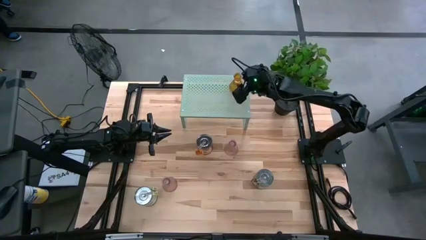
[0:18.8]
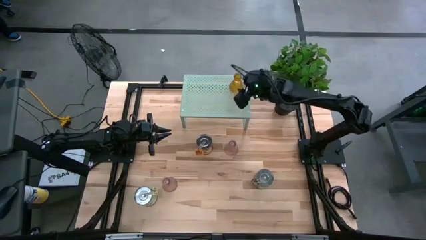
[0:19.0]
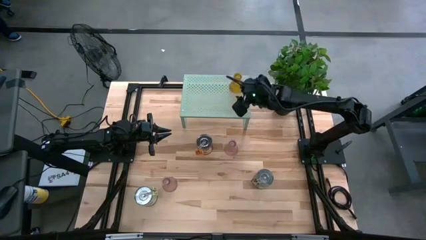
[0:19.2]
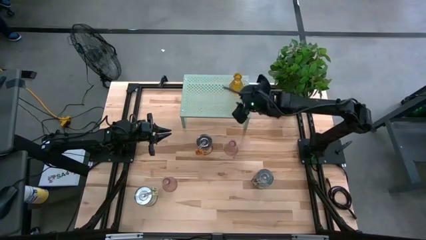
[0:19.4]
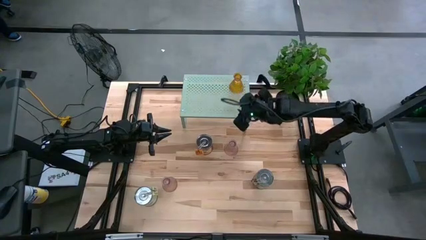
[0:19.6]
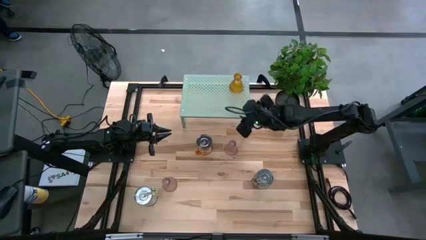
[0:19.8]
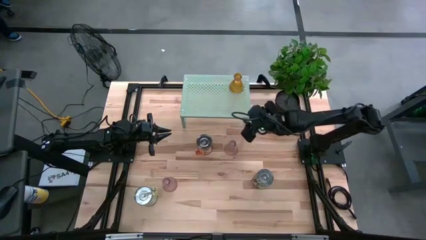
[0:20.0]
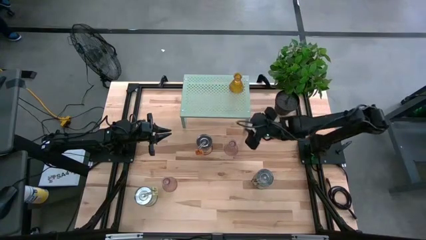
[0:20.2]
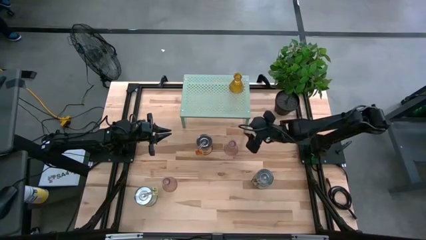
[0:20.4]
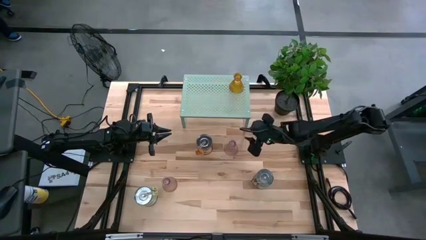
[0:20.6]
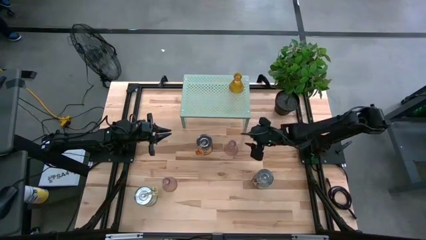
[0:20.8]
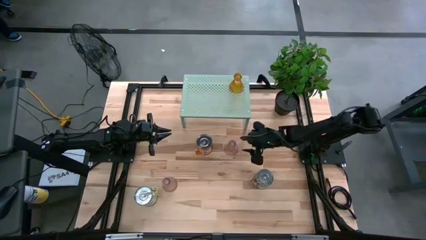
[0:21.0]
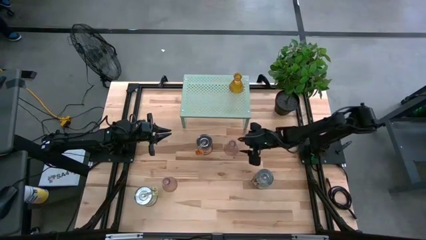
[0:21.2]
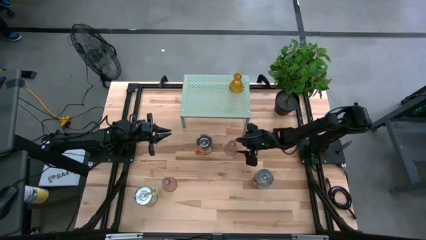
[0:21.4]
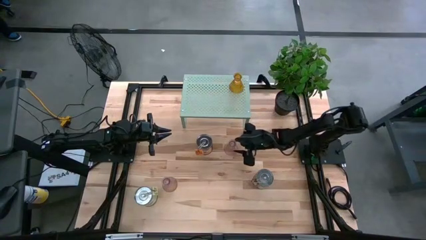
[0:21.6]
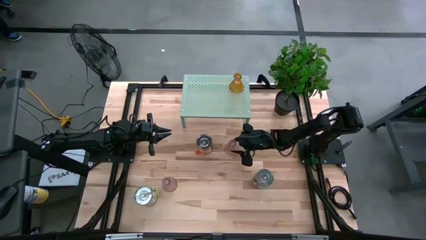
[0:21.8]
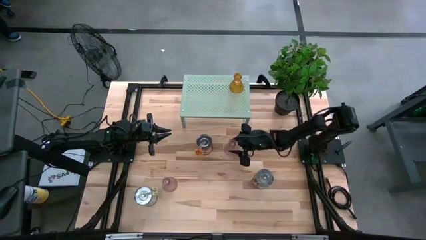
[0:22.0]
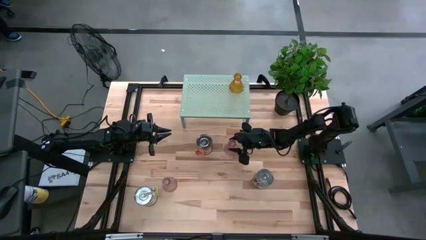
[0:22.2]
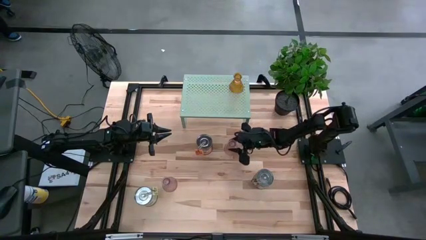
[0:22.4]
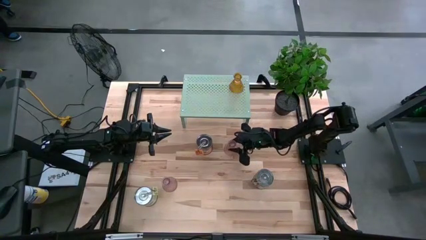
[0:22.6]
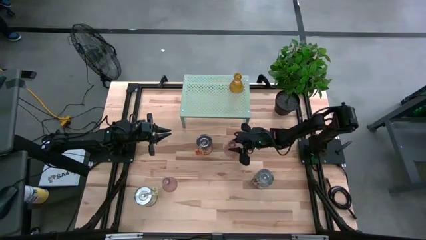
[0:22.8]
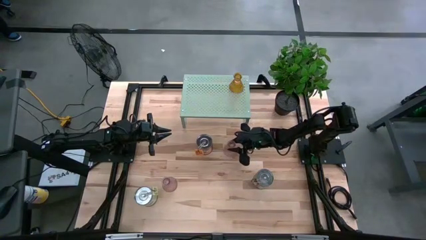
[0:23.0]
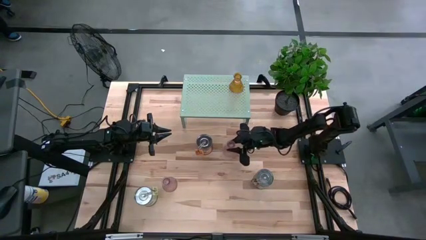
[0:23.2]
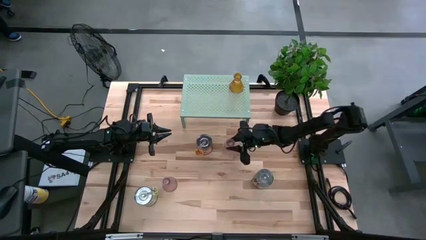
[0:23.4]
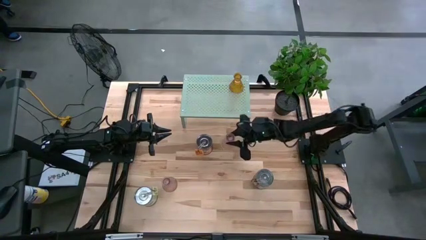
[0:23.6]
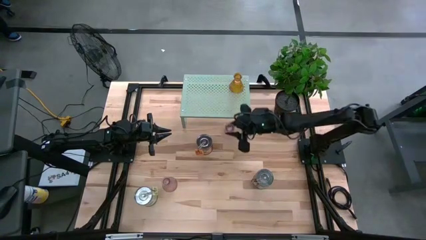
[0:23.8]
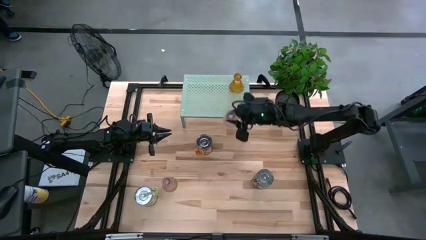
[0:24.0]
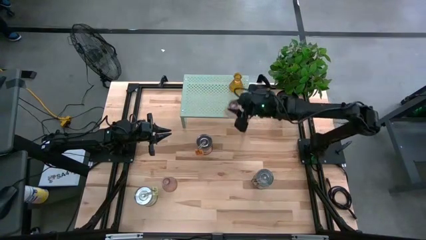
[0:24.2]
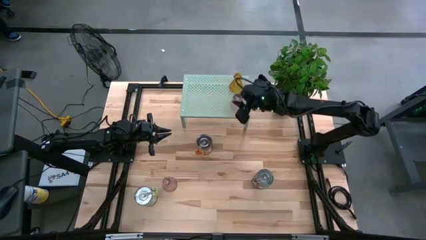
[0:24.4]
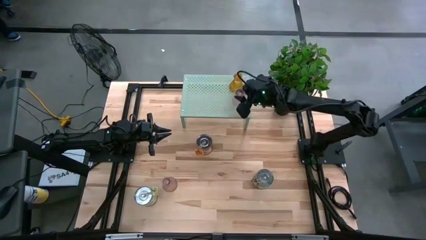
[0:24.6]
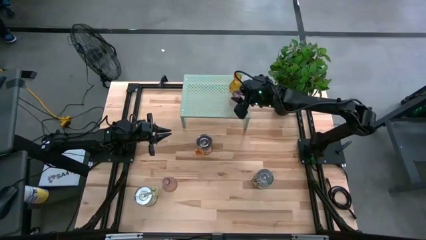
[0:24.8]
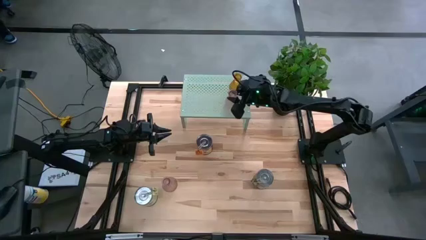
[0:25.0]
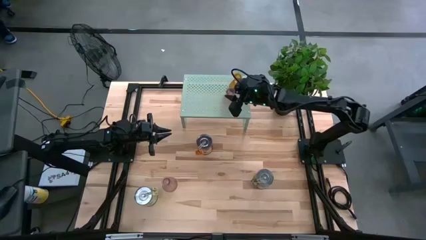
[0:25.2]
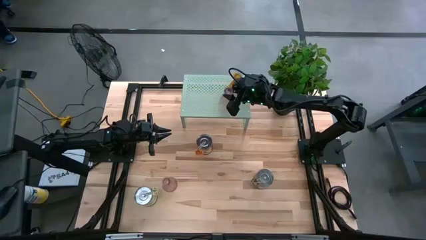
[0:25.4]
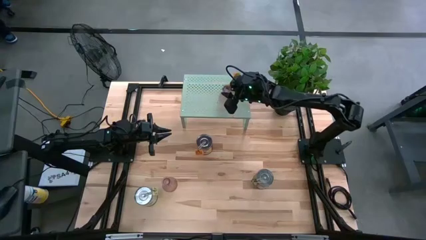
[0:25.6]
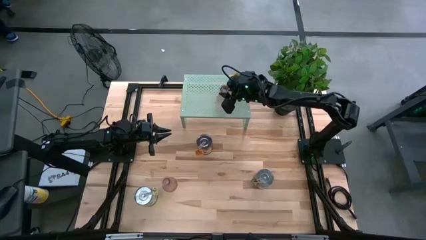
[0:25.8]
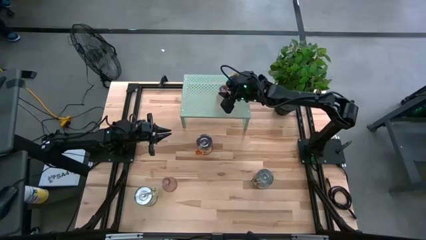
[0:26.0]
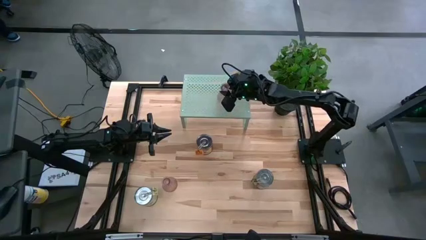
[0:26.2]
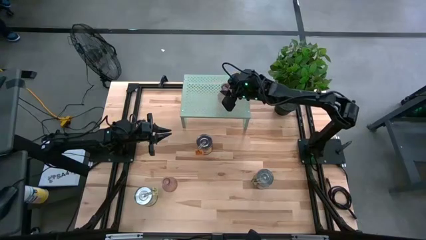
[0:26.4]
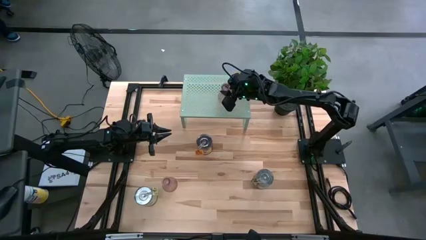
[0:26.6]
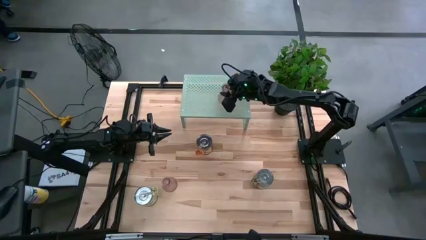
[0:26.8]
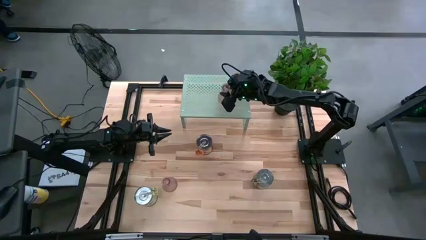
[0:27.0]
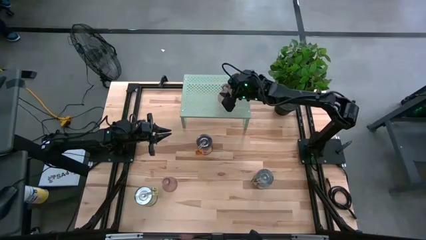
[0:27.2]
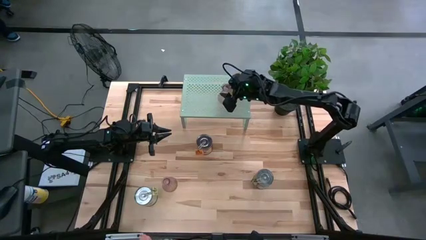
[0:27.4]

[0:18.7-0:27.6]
Task: Pick & Place candle stick holders
Put the top purple glass candle holder on the shelf

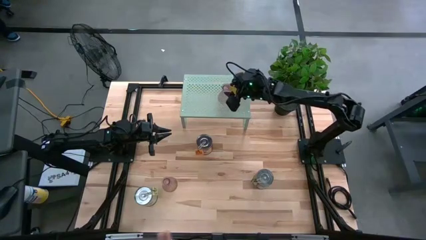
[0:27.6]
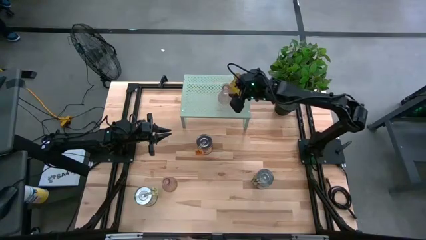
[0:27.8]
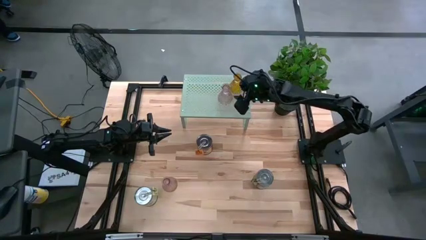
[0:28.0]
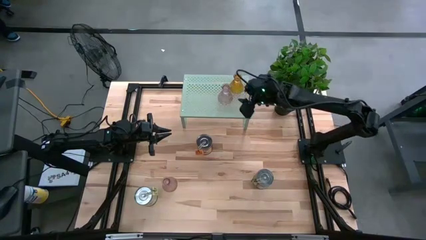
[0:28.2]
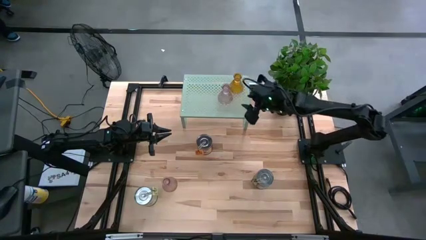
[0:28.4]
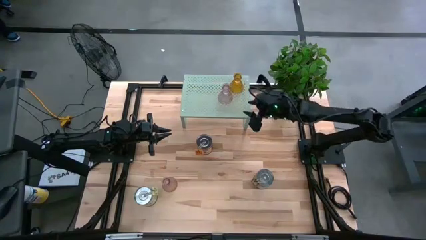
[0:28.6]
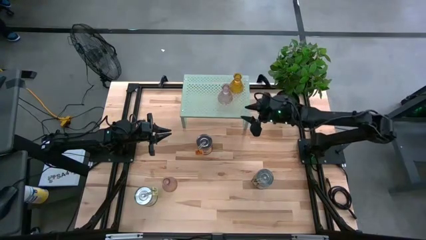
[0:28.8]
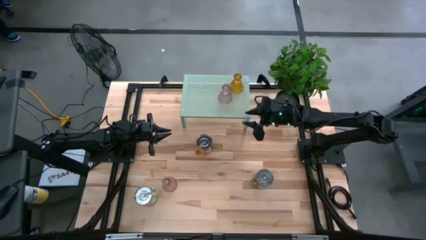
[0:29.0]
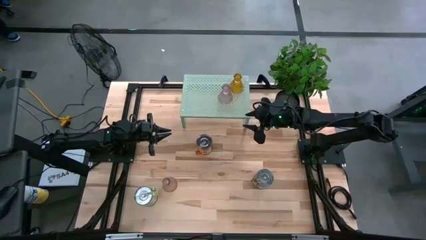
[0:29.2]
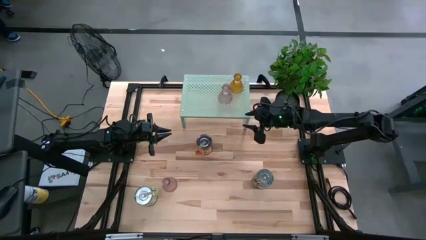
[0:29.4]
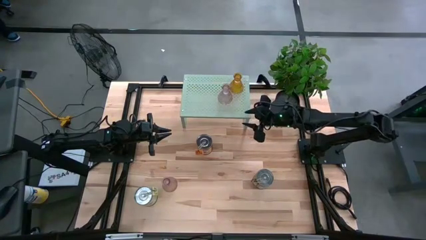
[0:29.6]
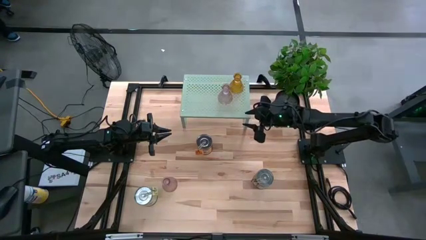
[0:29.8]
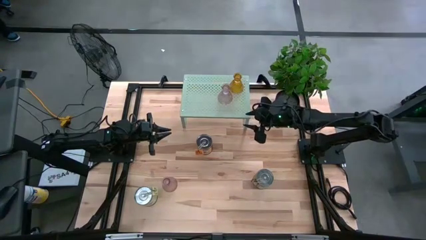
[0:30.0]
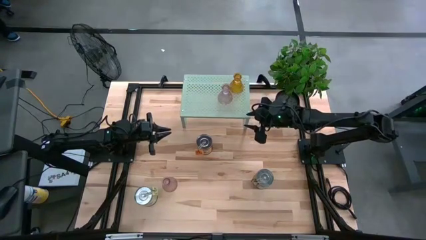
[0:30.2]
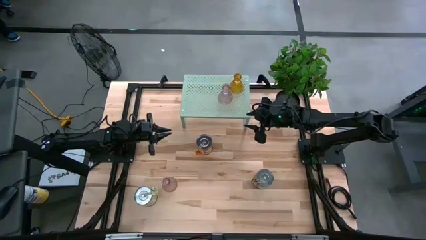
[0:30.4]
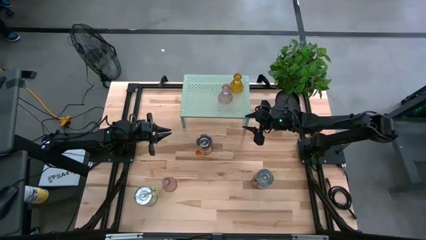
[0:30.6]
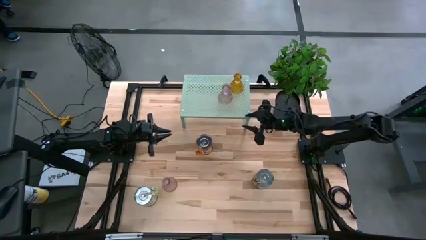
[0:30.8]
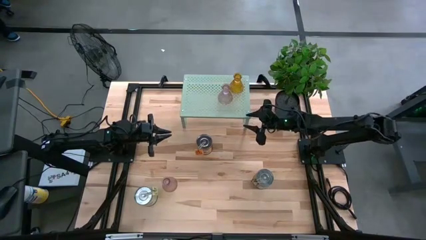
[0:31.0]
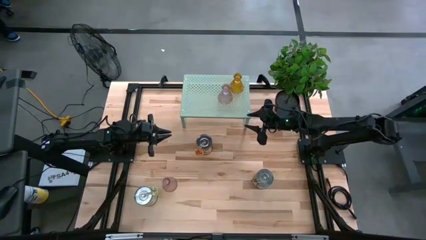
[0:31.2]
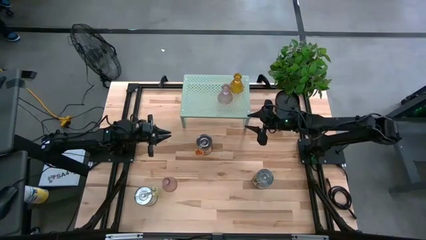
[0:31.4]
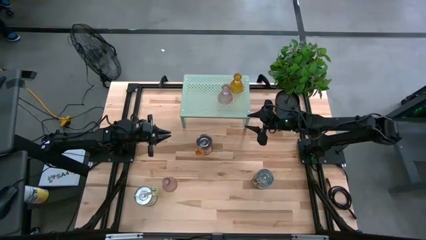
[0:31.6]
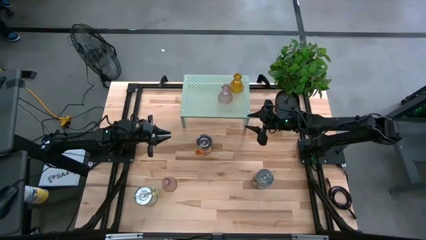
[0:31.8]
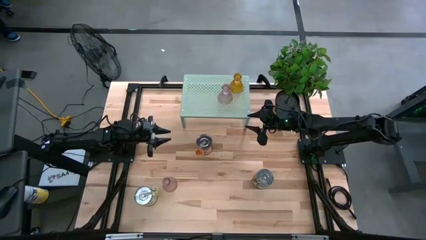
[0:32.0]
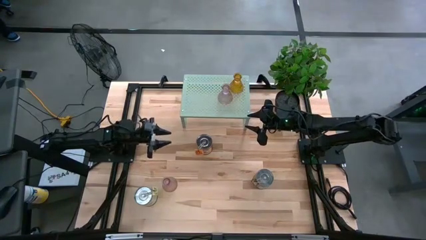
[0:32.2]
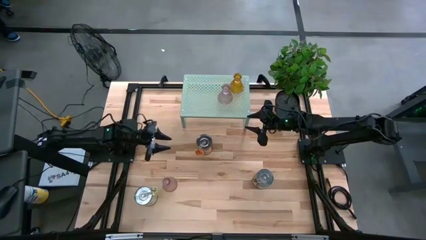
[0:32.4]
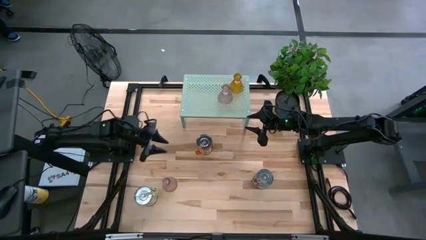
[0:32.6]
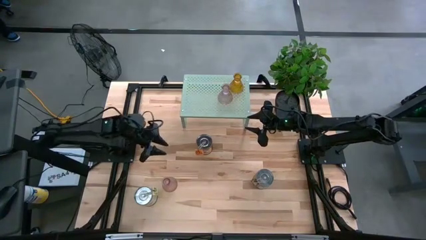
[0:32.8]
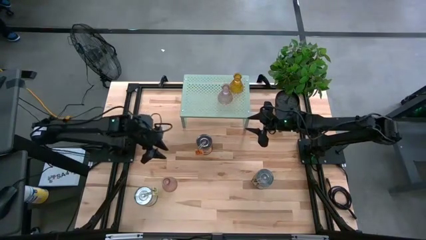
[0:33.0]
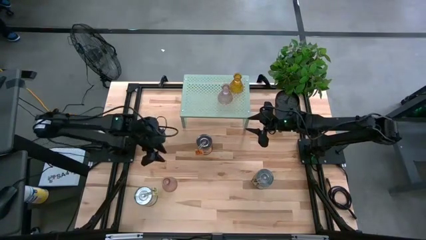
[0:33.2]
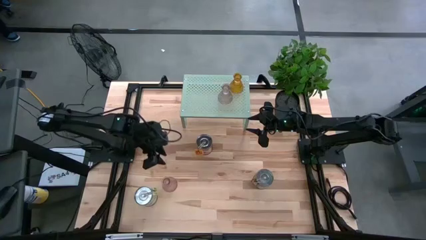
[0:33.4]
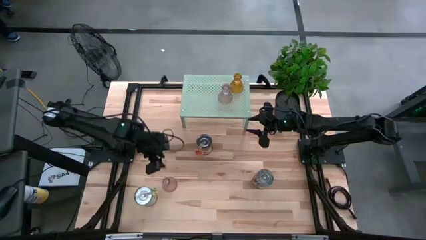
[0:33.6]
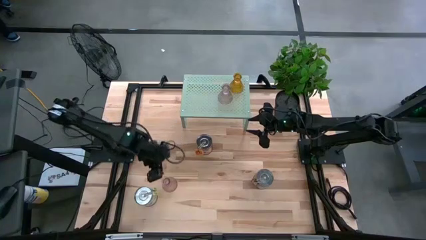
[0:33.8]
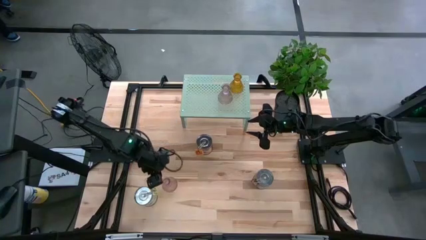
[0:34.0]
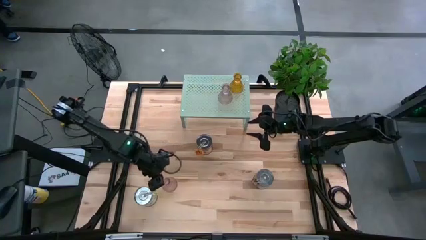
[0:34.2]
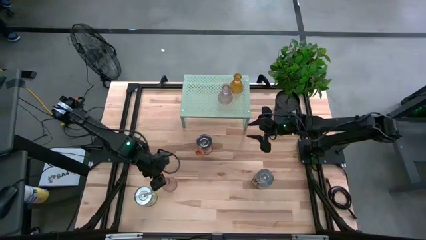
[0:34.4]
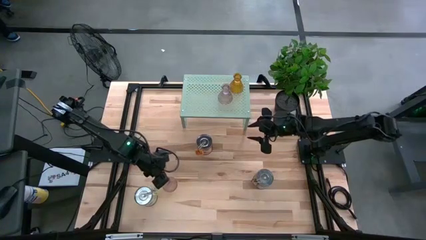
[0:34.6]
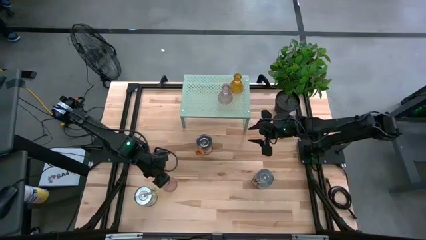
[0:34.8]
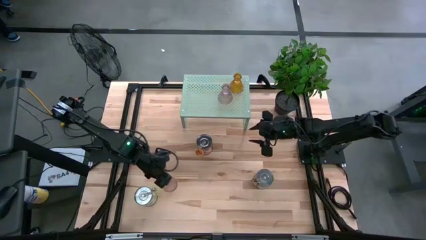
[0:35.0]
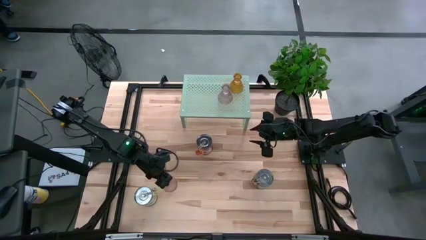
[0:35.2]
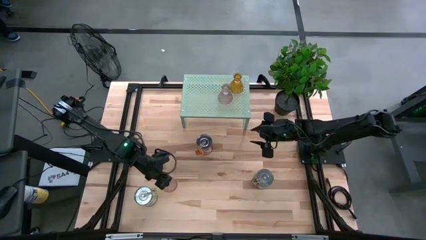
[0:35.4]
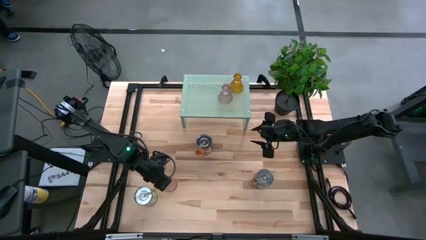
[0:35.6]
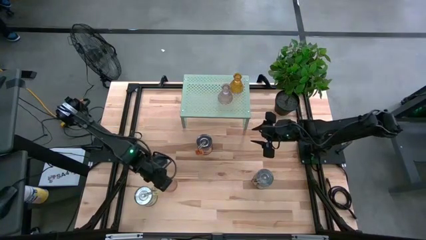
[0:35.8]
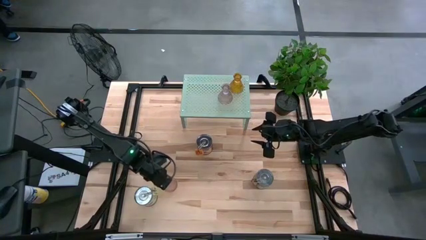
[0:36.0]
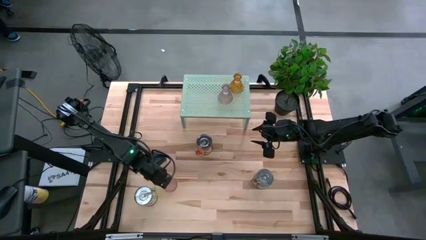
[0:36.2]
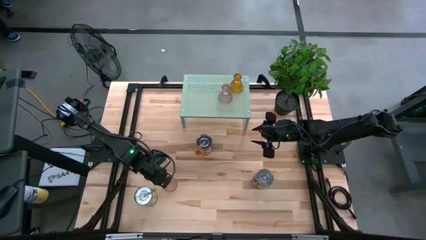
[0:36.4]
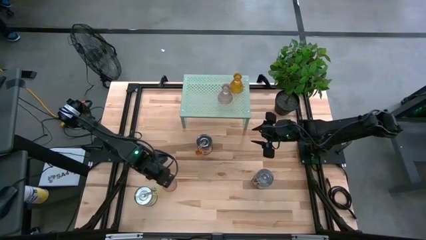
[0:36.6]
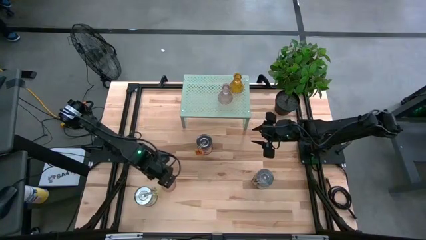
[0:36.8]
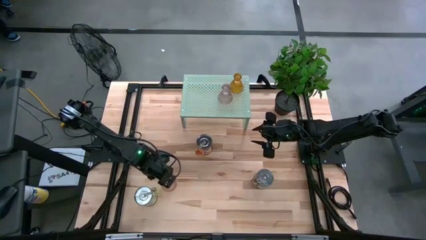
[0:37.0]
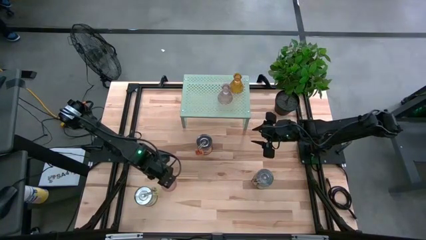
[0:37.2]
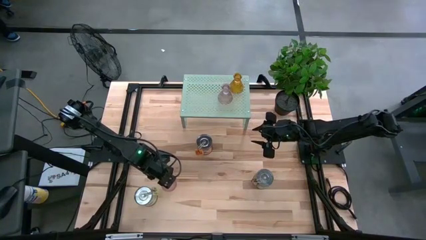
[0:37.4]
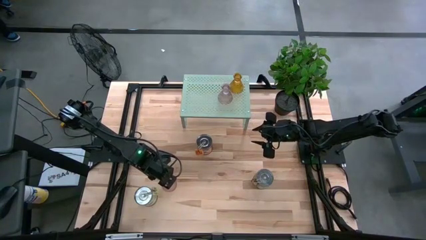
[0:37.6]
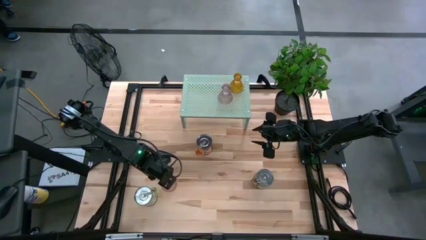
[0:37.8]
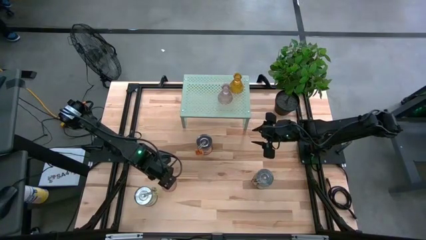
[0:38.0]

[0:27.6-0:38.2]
Put the purple glass candle holder on the shelf
